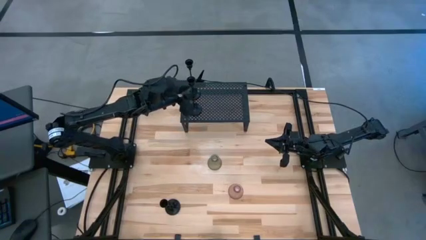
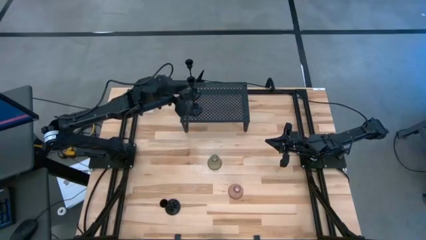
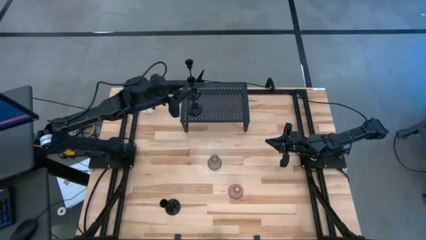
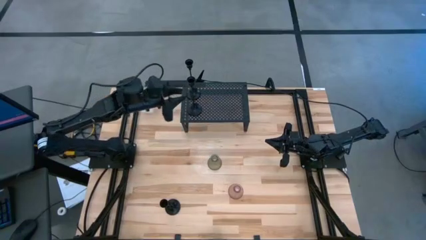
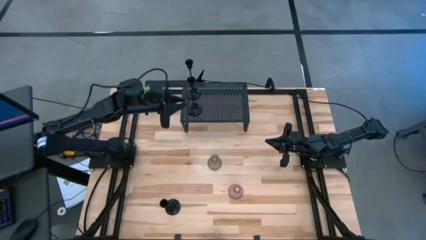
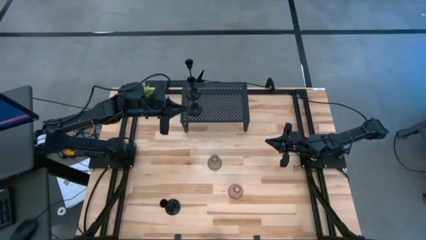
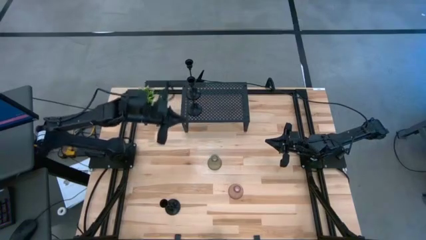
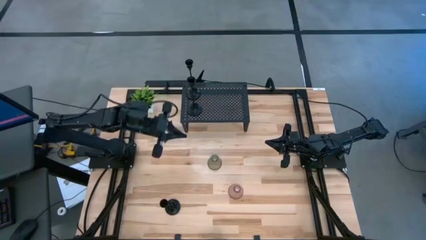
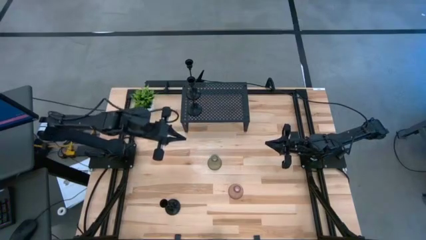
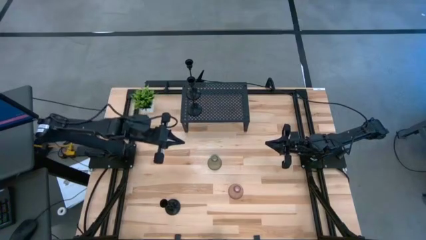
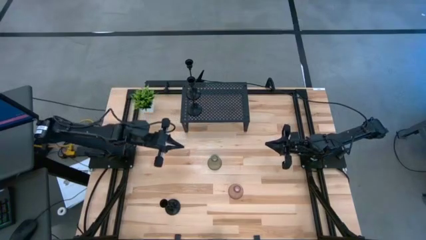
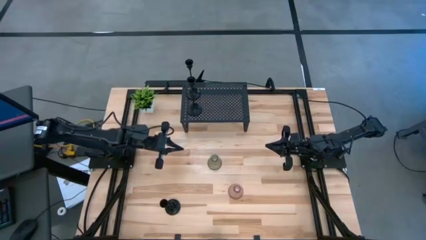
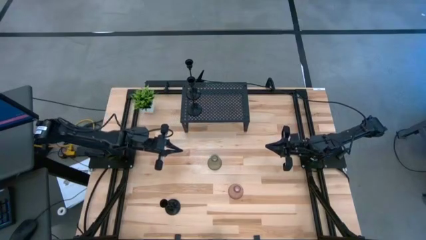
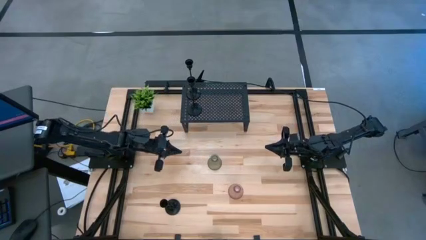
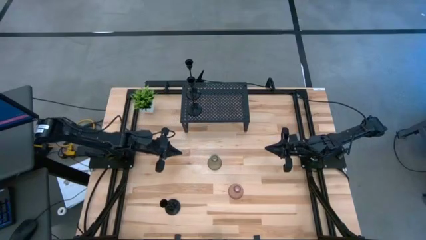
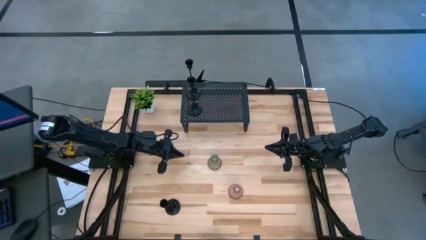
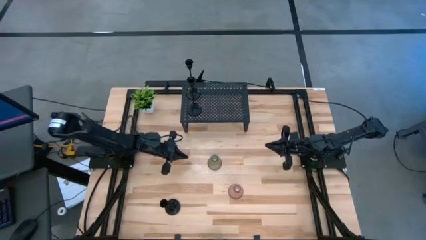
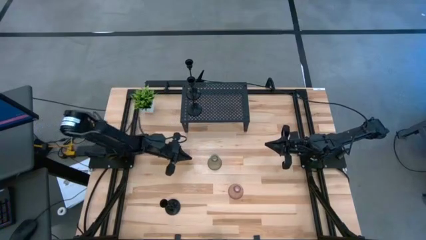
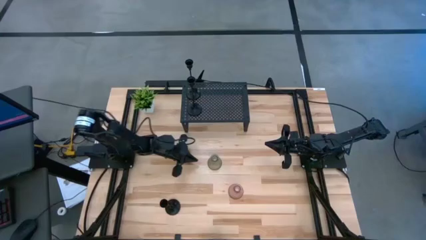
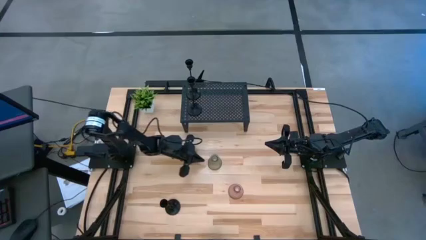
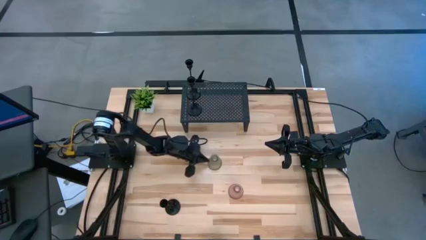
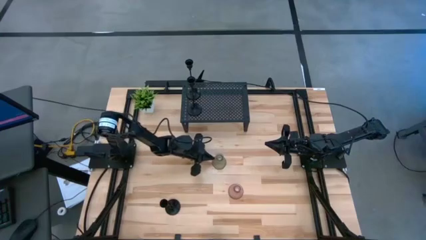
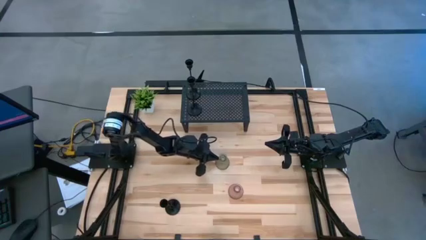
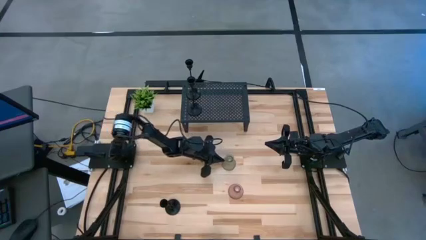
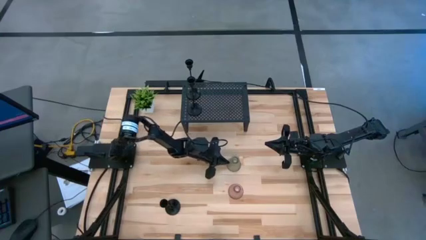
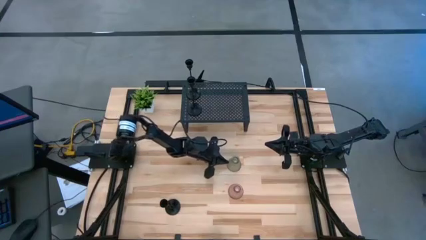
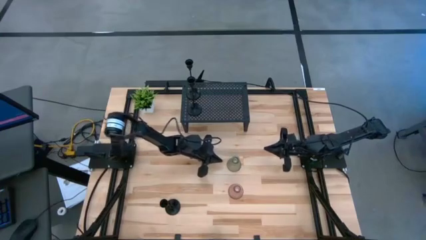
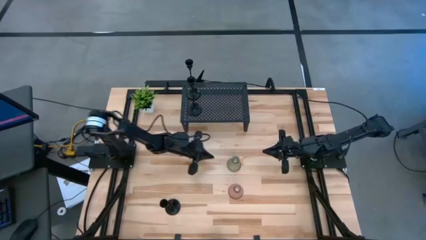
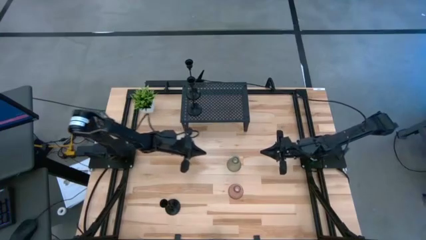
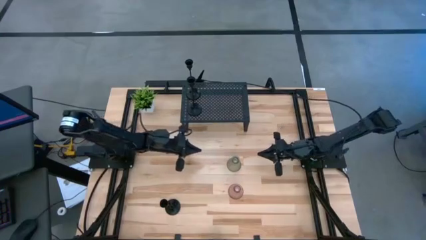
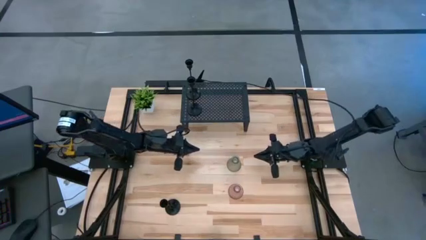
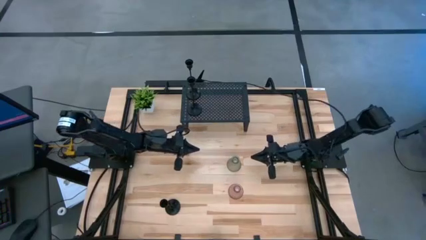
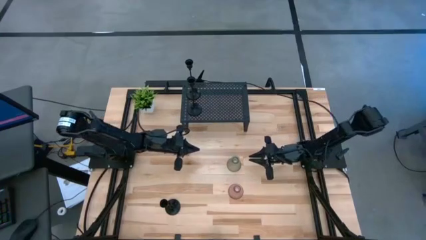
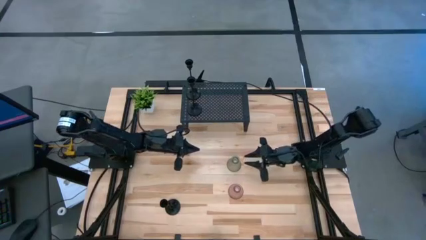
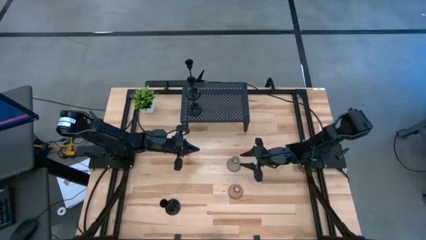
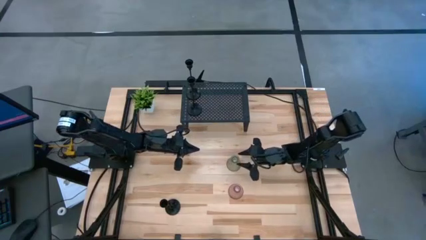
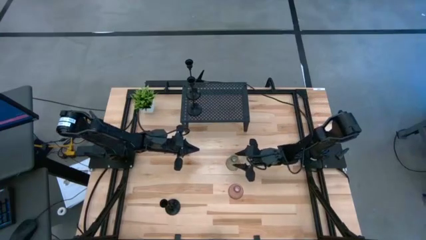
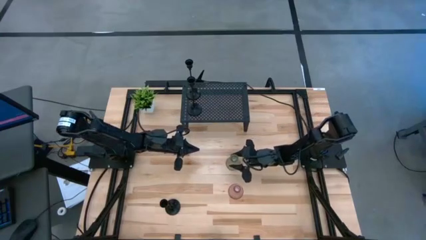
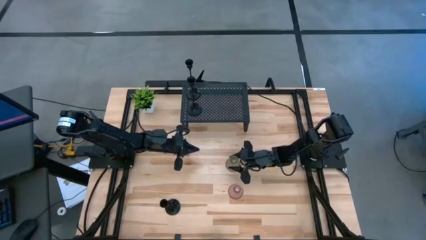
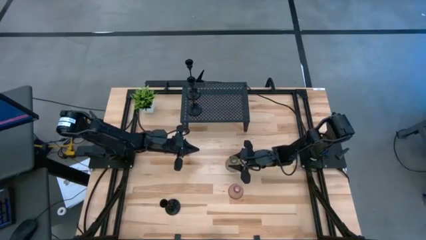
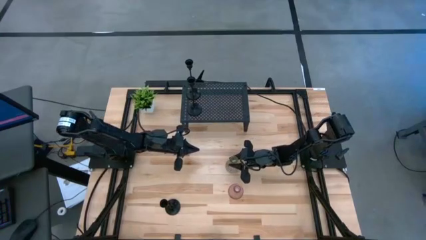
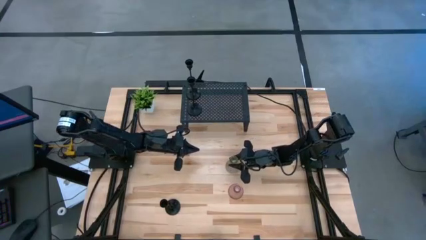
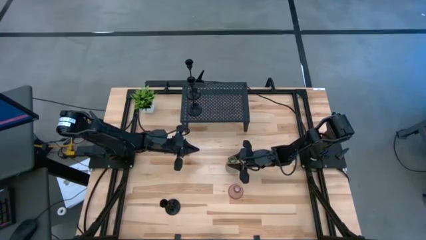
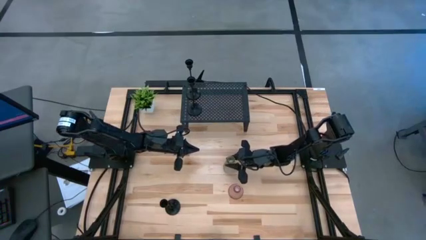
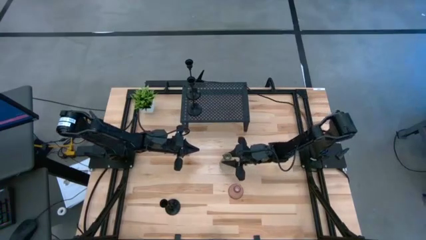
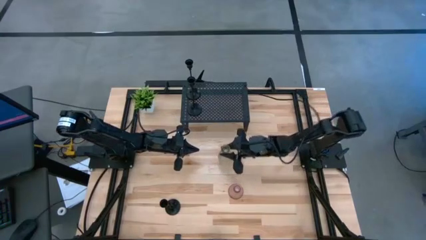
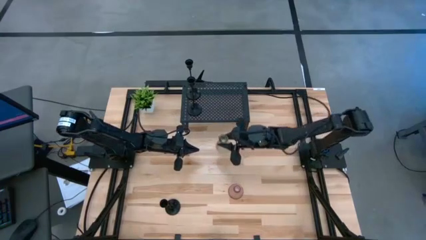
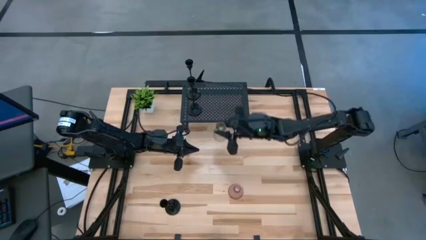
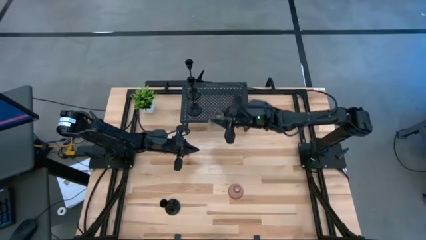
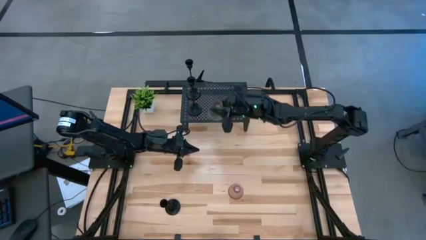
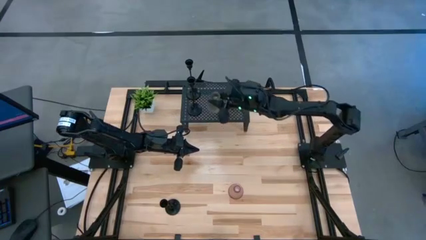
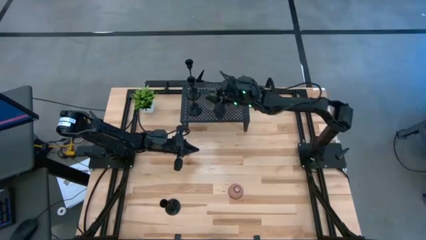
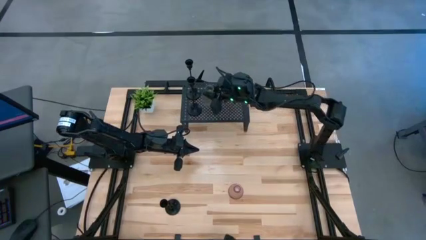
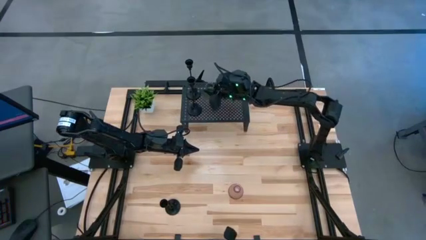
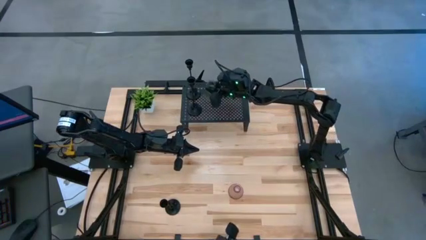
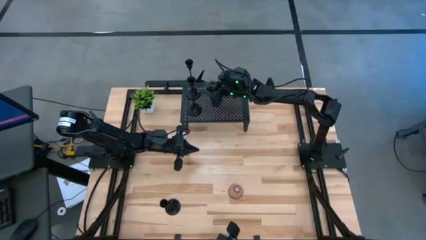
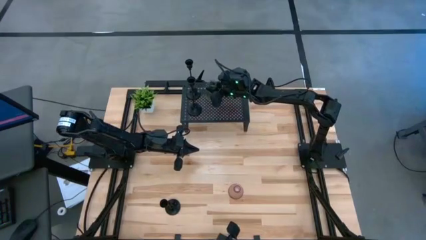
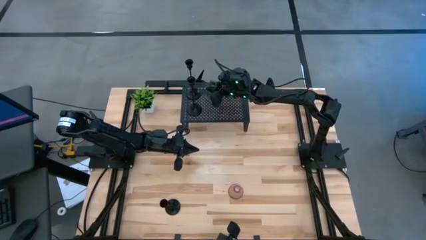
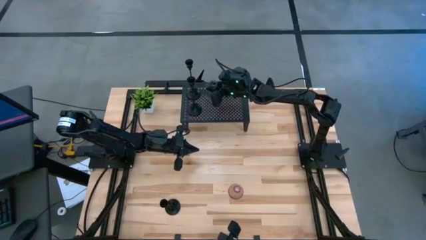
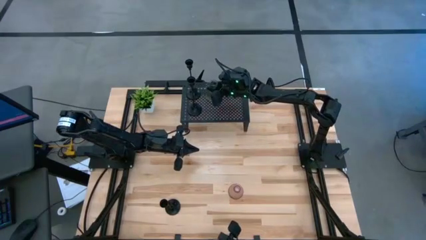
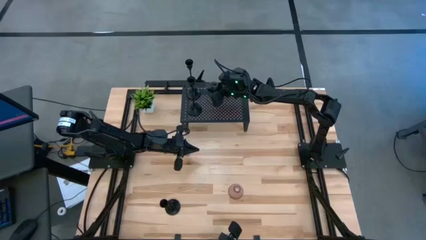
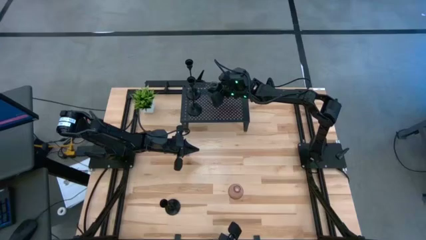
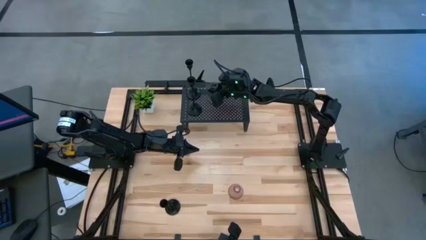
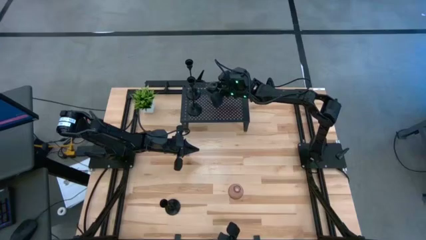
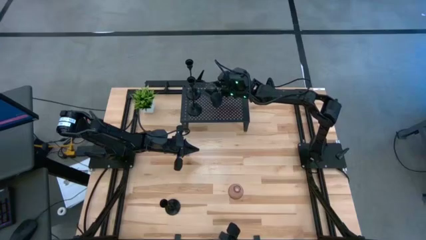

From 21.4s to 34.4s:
Task: Pick & Place candle stick holders
Put the green glass candle holder on the shelf
